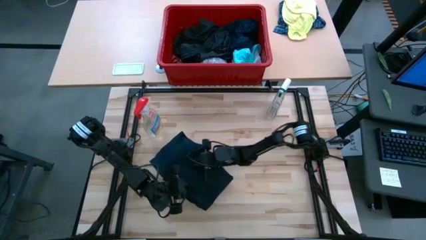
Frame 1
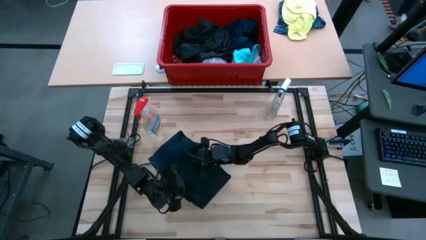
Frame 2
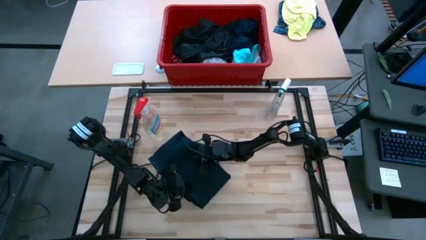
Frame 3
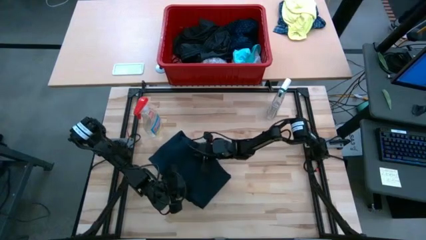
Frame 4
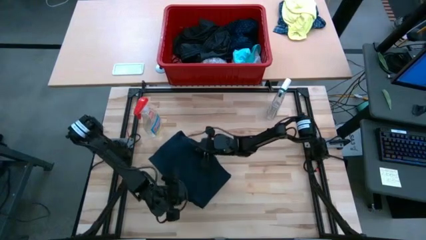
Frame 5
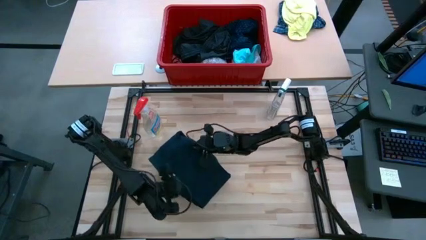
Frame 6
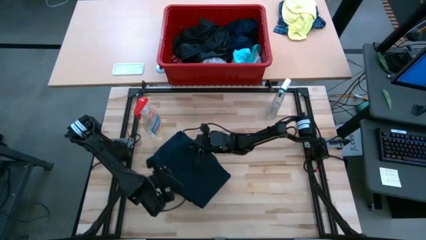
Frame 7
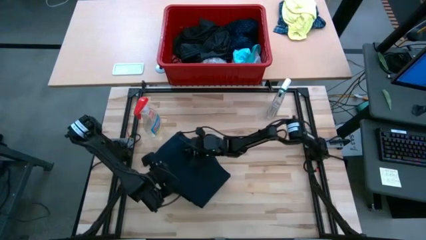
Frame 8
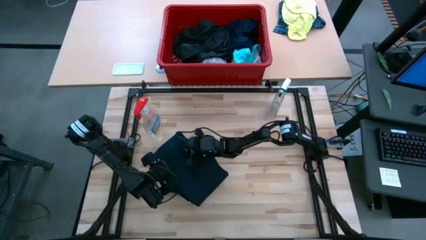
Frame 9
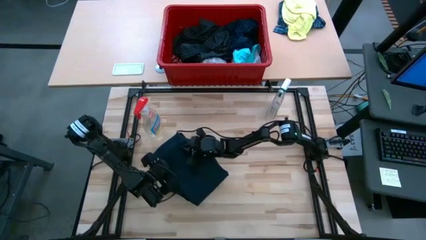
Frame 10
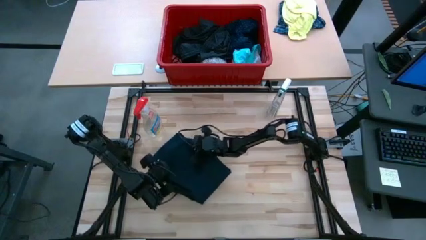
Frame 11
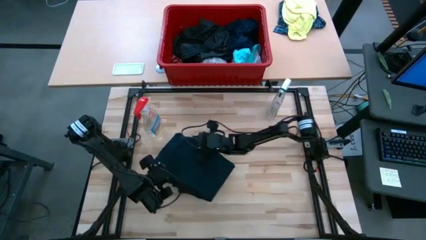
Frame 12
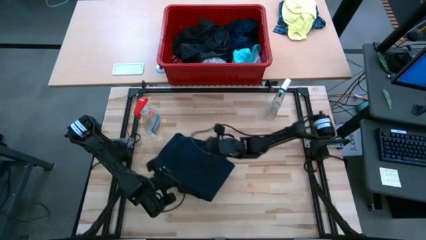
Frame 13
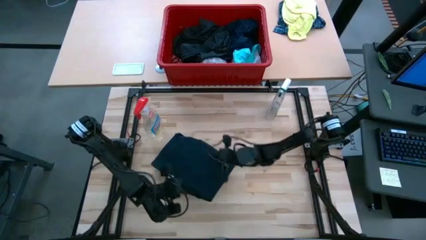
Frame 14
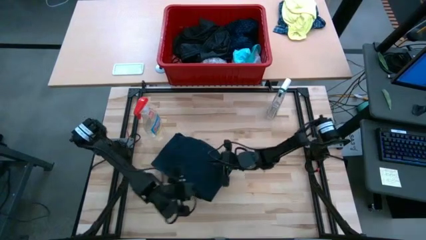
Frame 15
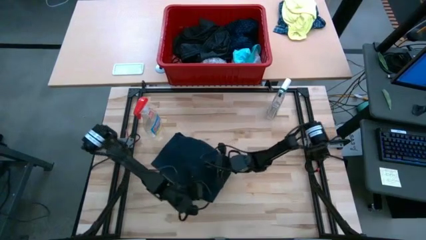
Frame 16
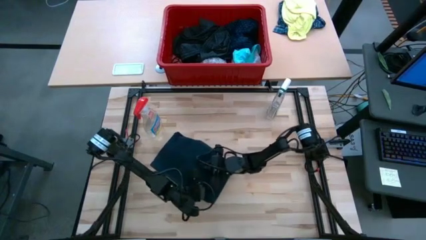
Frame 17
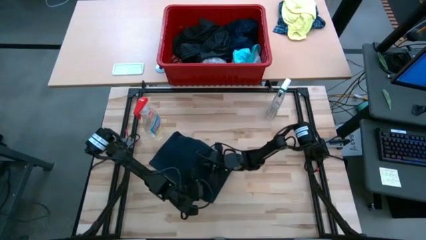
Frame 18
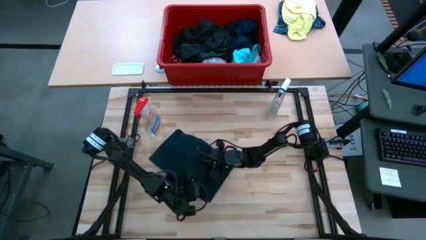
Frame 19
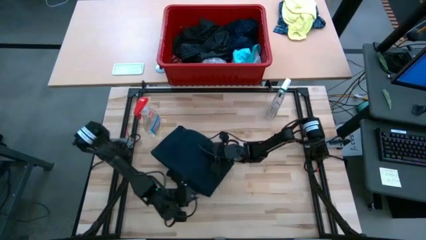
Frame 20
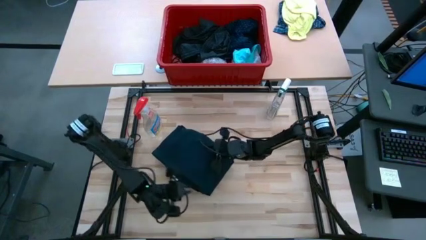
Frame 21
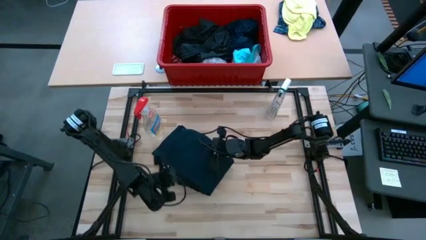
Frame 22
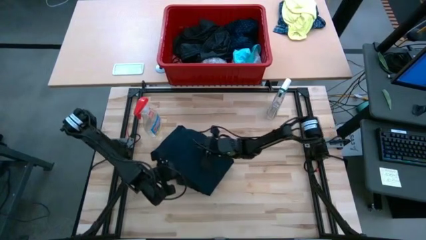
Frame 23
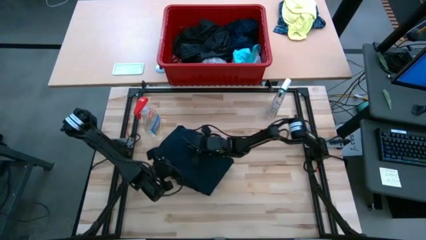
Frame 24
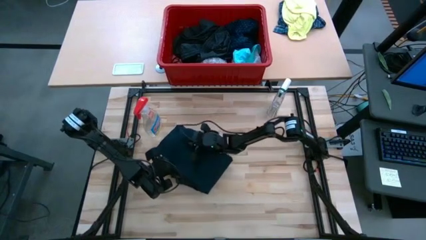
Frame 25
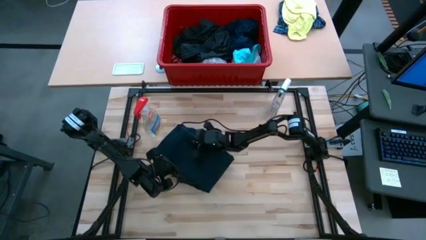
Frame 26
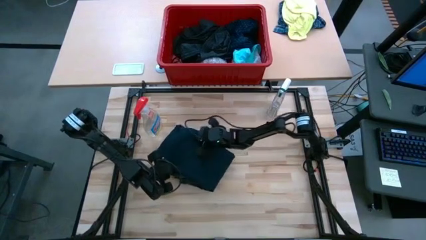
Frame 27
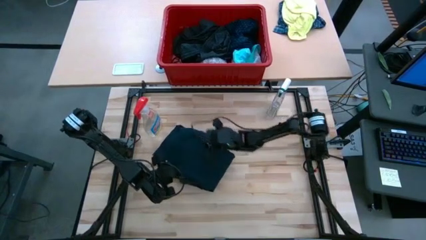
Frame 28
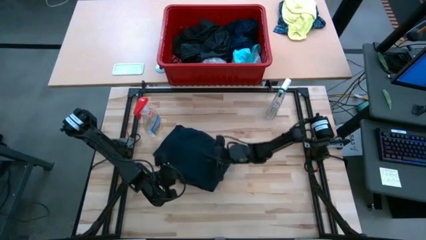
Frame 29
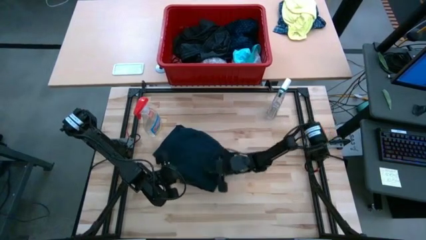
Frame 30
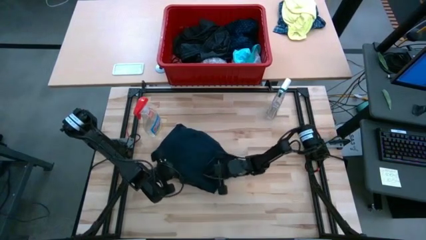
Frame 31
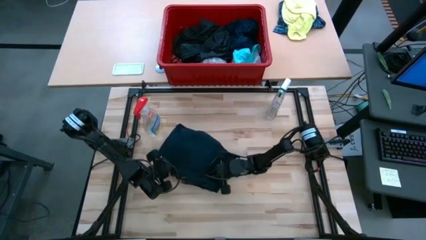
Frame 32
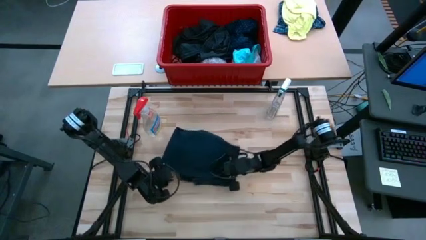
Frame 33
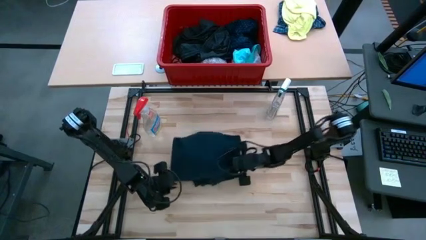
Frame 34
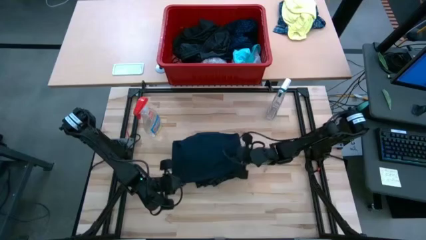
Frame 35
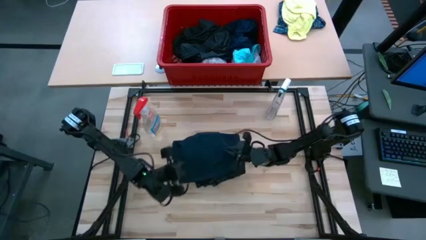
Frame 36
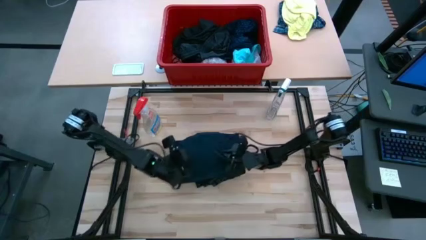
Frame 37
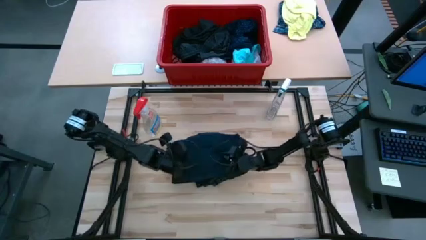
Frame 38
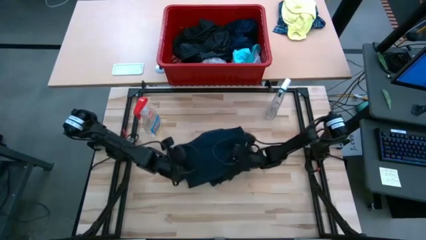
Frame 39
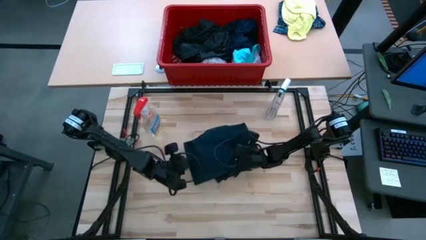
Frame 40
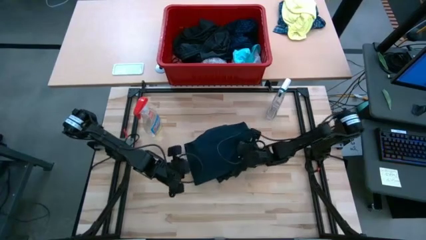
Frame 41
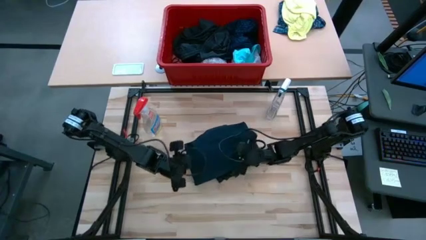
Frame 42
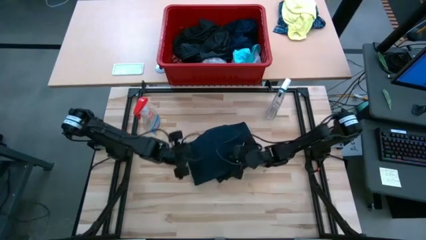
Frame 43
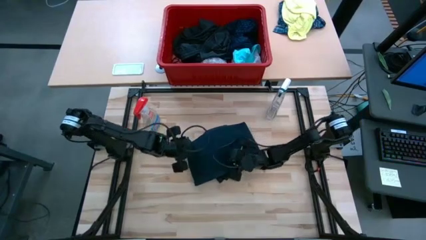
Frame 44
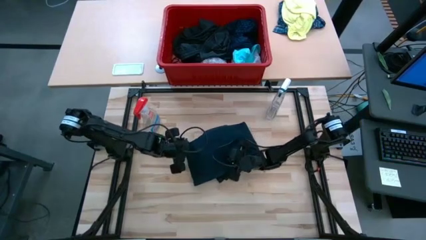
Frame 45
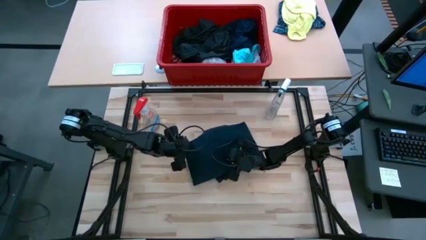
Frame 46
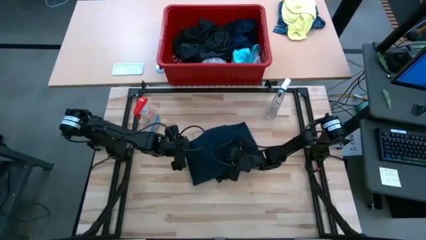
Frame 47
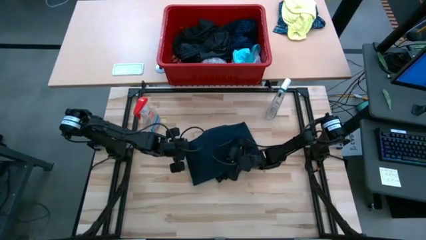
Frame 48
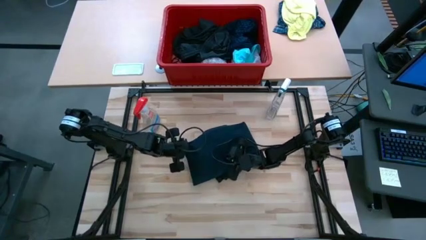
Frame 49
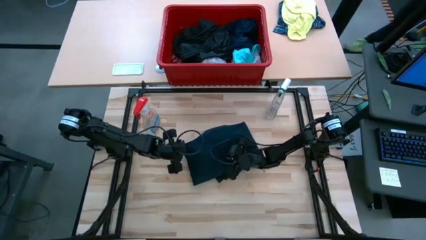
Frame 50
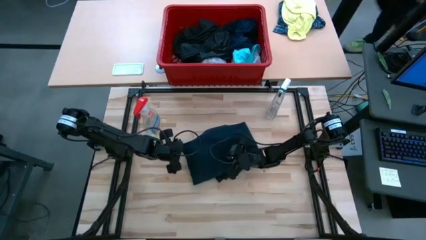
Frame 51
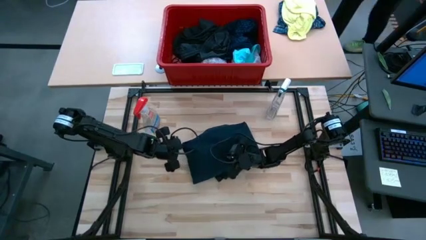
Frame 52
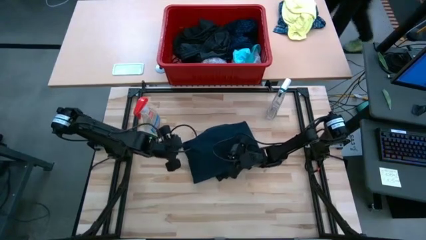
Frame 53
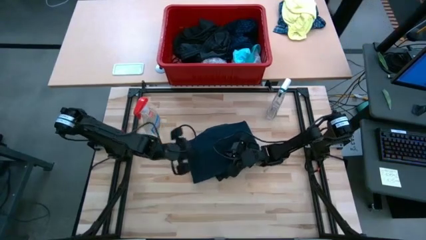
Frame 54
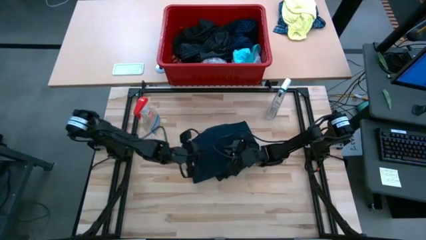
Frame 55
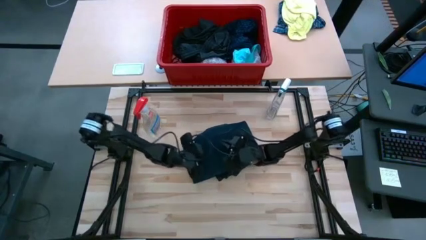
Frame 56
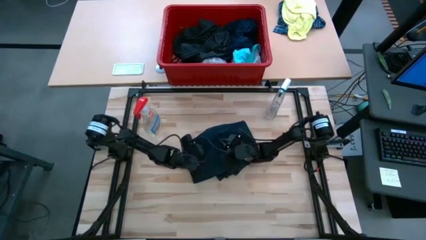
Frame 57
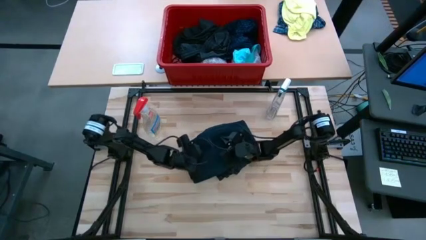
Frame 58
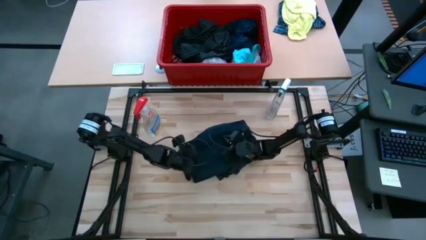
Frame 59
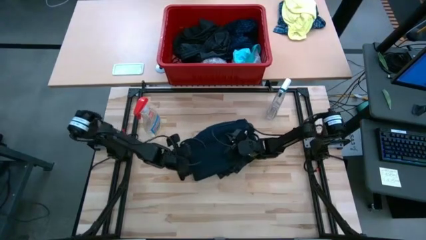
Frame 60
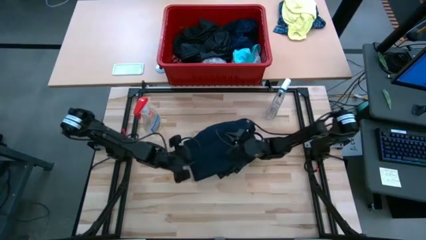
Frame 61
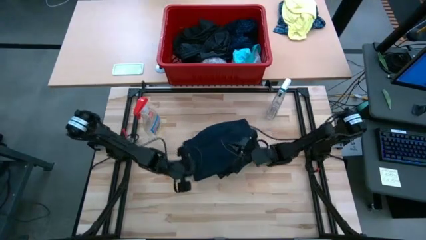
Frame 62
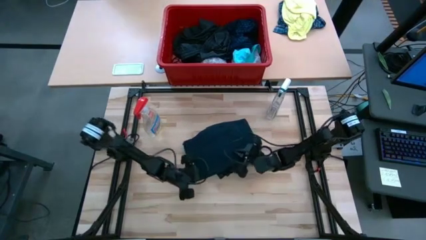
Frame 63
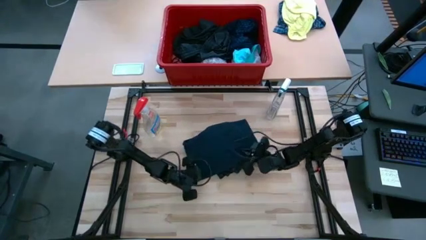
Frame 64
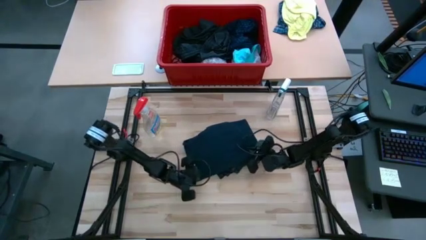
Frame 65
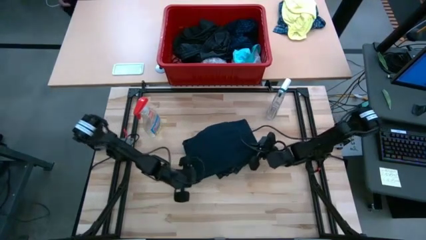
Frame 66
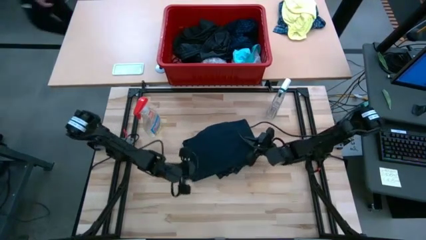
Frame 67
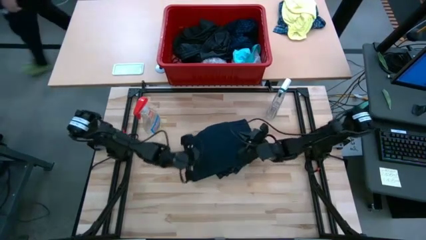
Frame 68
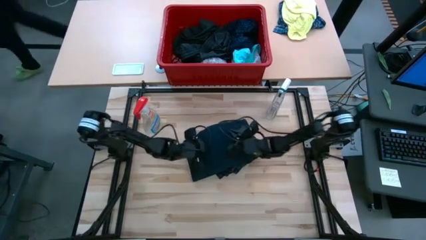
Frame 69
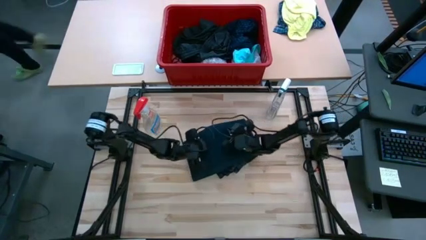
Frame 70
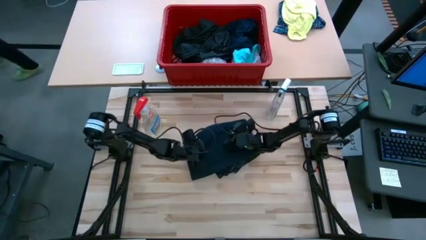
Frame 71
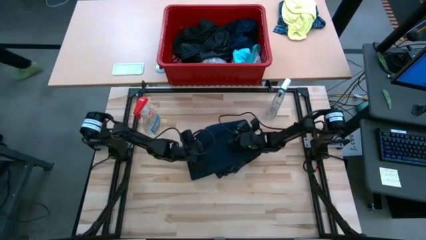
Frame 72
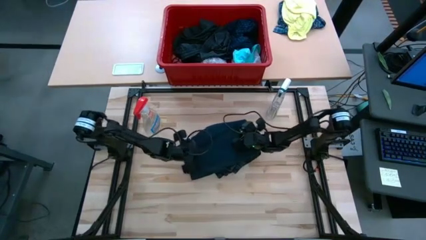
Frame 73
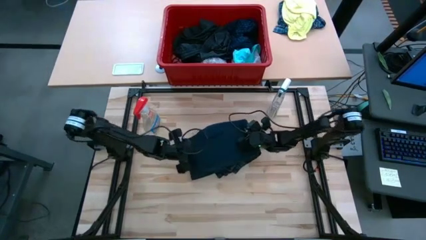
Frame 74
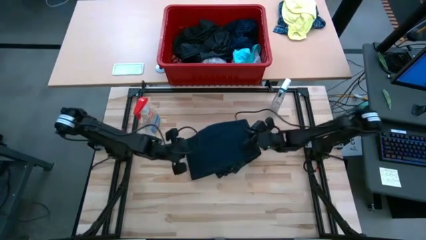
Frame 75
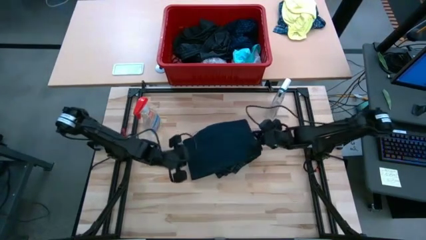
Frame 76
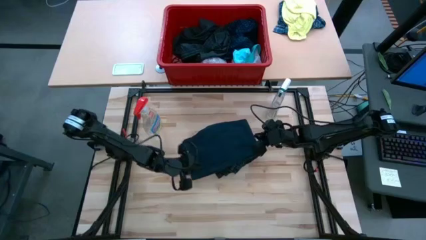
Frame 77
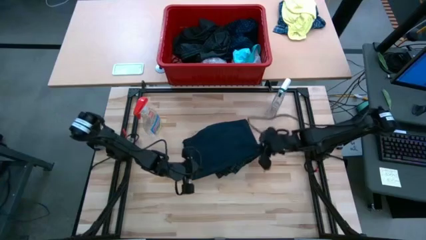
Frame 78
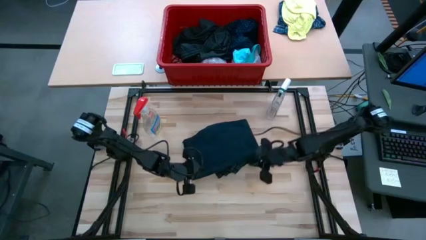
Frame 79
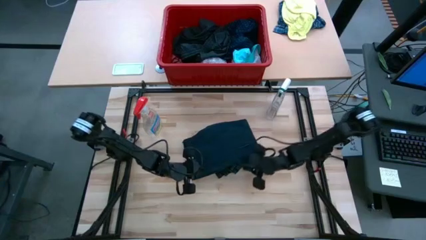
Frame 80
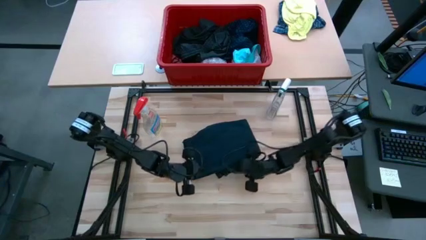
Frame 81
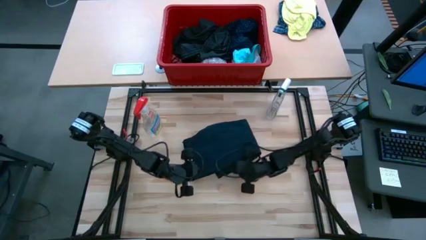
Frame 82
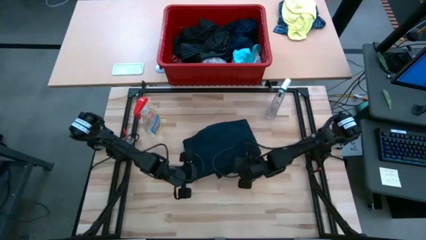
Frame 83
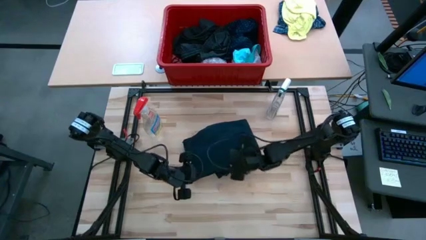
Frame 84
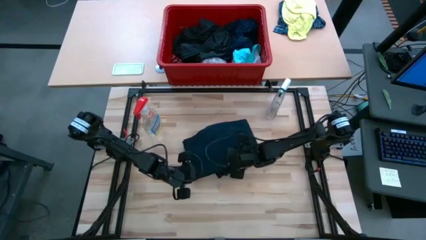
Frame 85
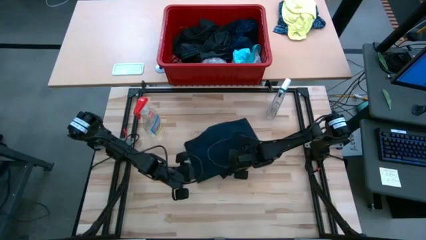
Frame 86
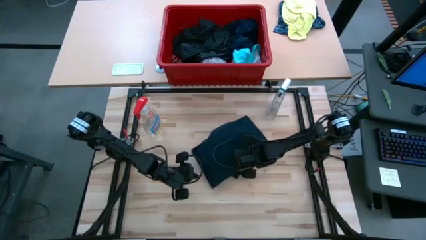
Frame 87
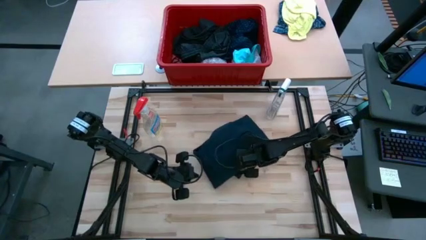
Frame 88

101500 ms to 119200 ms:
Task: Fold Laundry from Bin
Fold the blue pants
